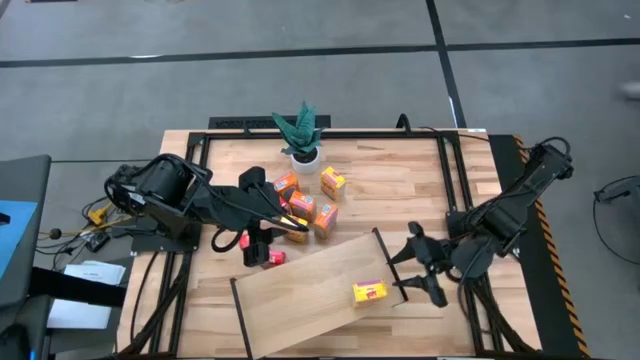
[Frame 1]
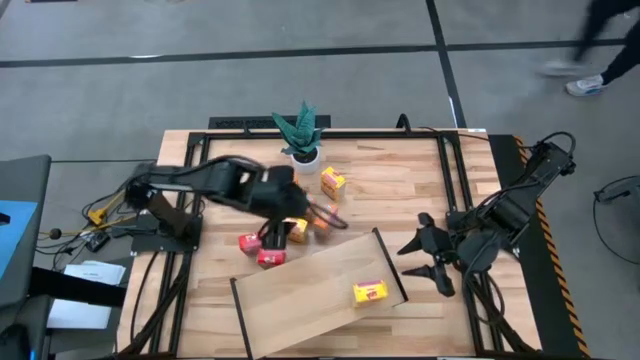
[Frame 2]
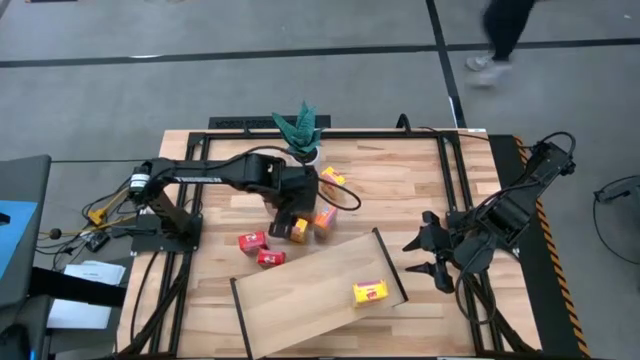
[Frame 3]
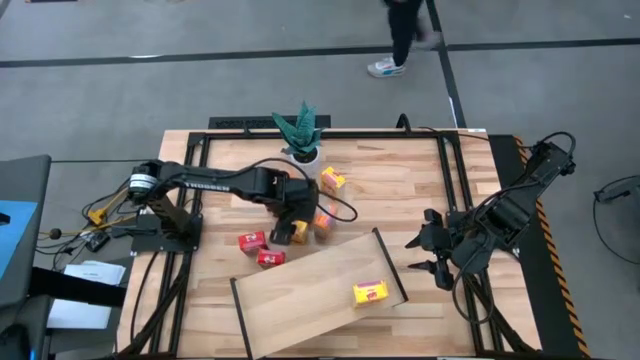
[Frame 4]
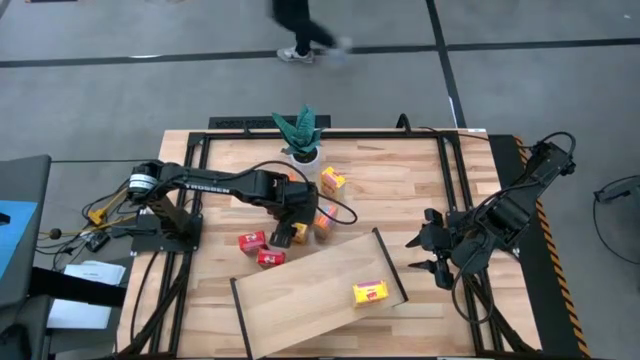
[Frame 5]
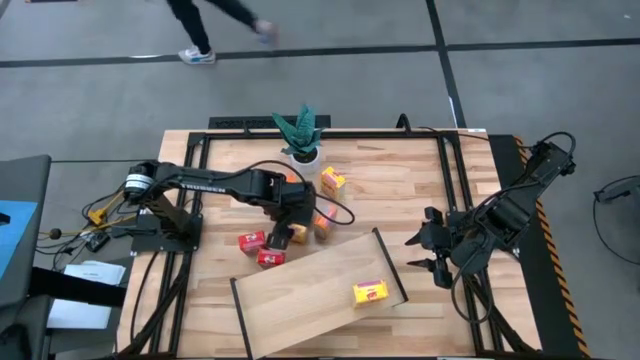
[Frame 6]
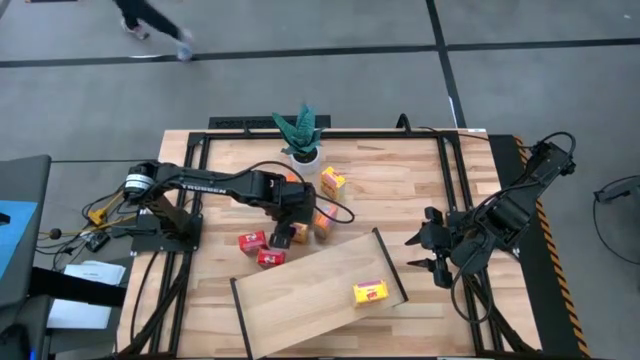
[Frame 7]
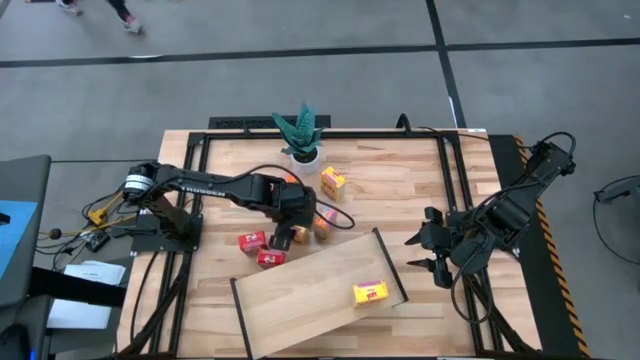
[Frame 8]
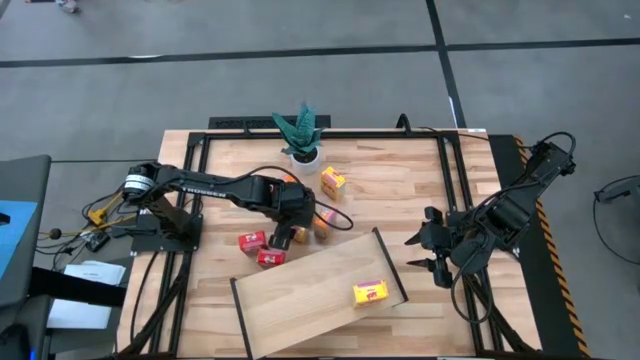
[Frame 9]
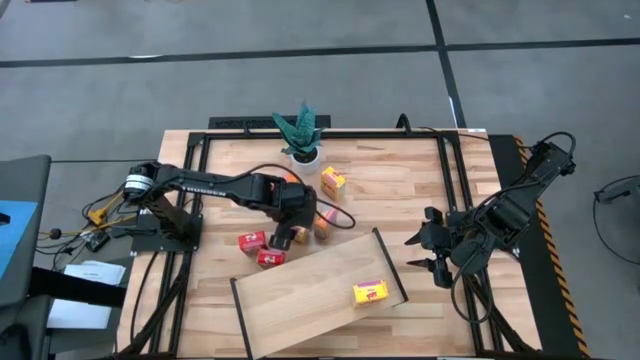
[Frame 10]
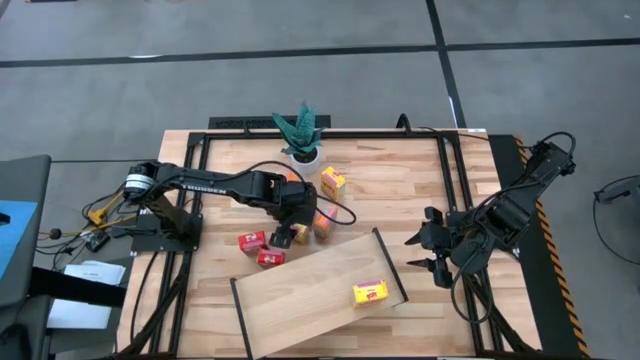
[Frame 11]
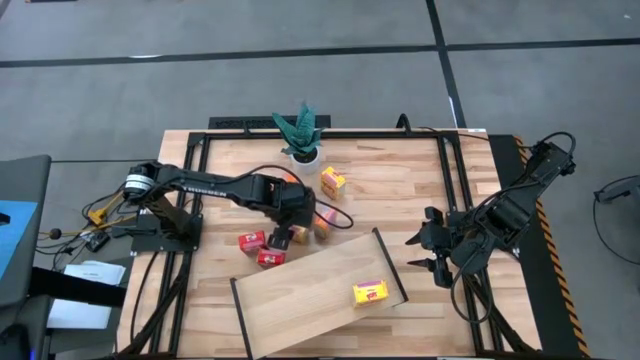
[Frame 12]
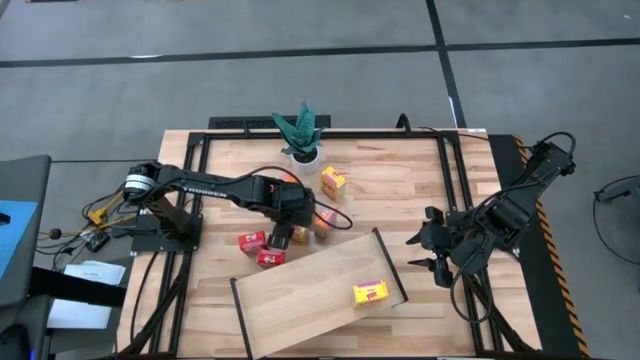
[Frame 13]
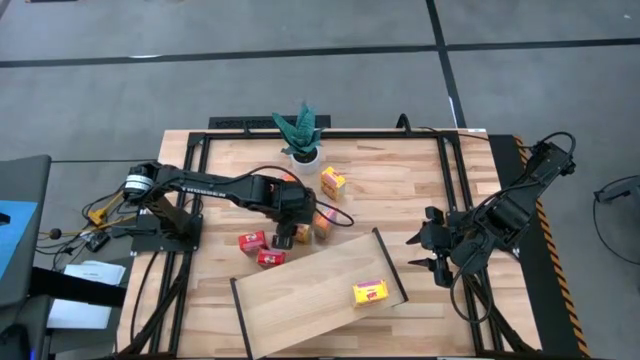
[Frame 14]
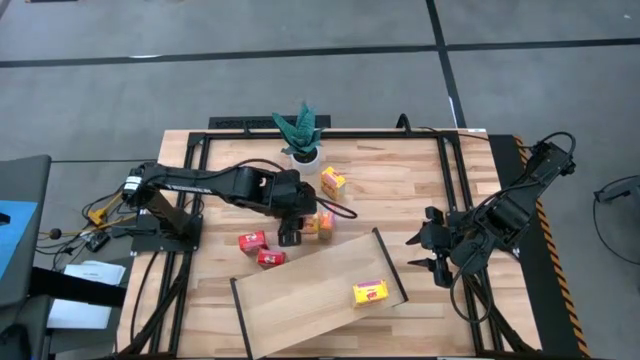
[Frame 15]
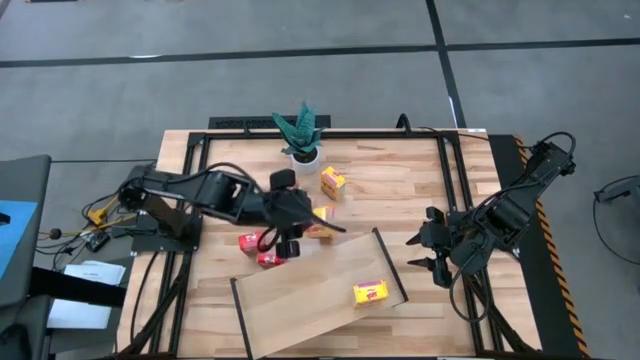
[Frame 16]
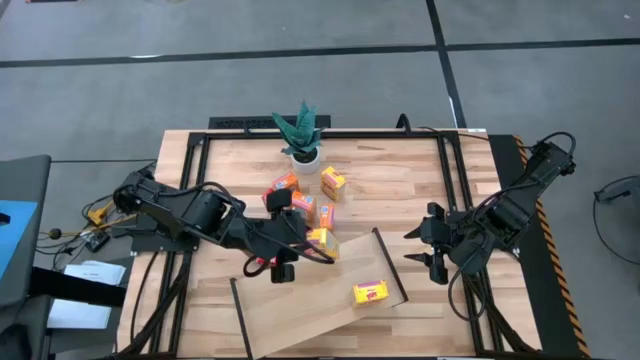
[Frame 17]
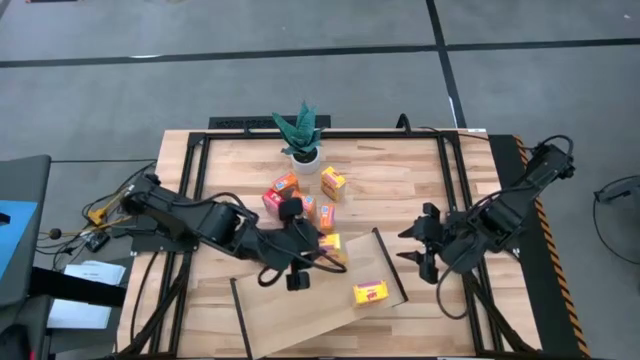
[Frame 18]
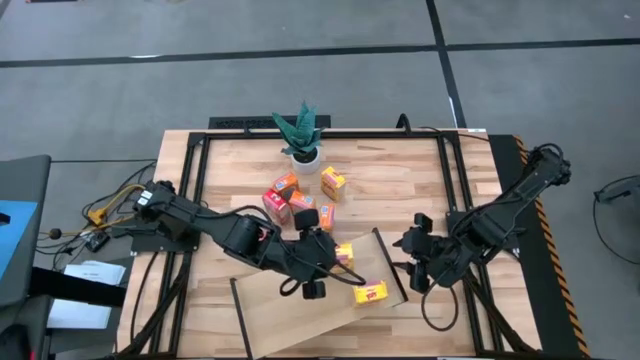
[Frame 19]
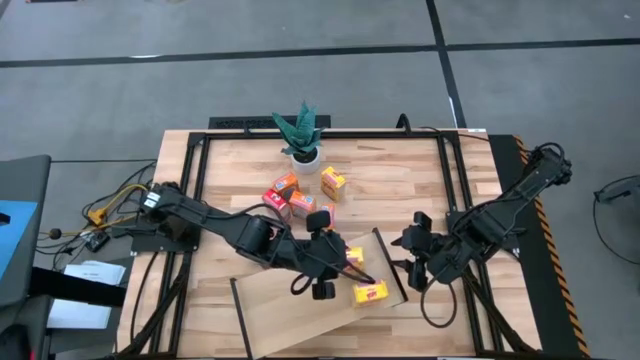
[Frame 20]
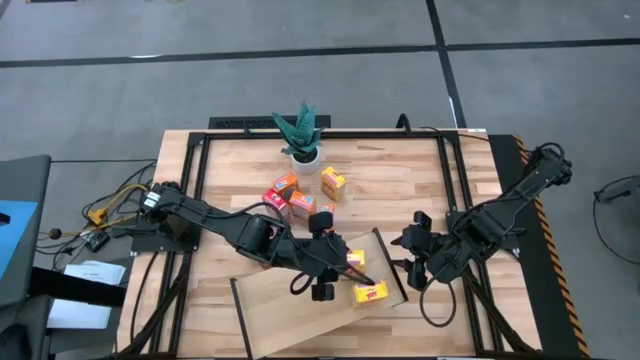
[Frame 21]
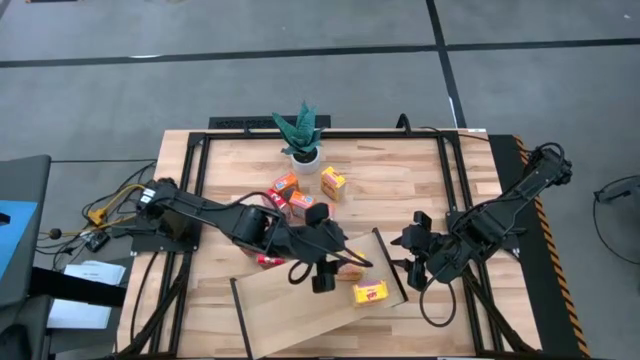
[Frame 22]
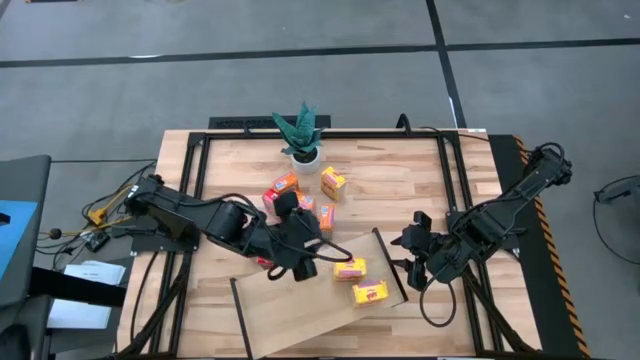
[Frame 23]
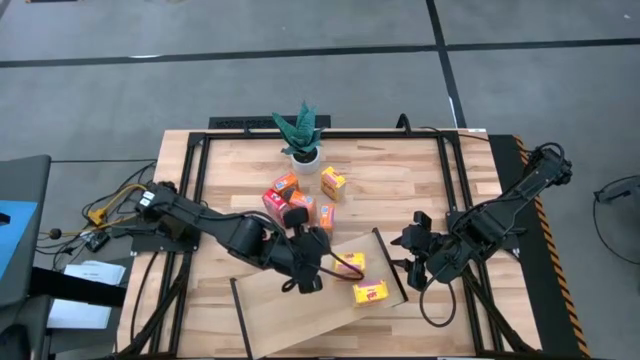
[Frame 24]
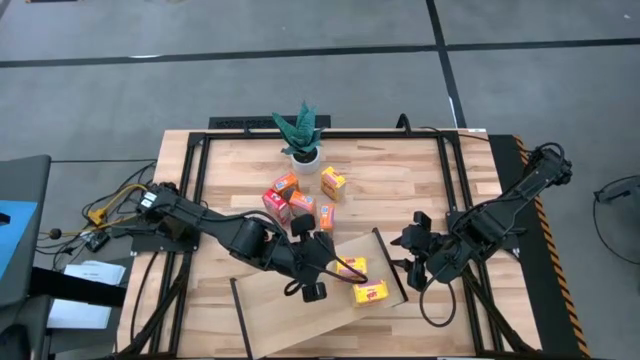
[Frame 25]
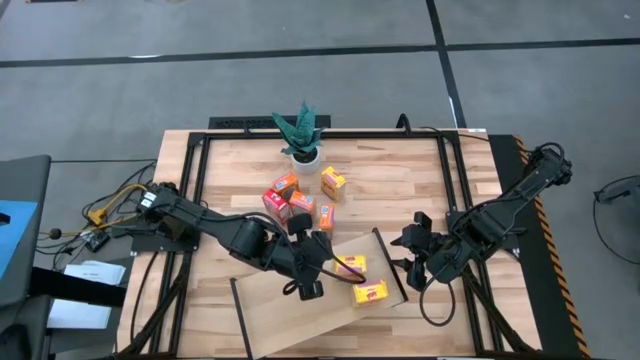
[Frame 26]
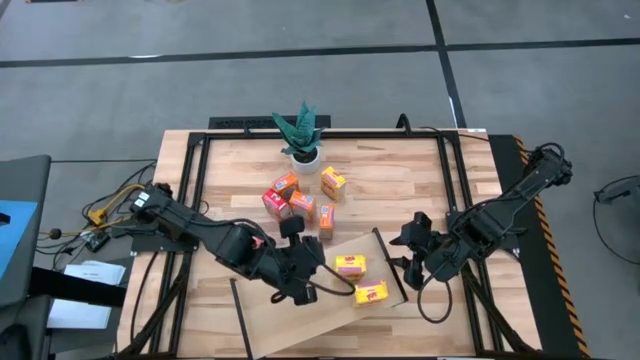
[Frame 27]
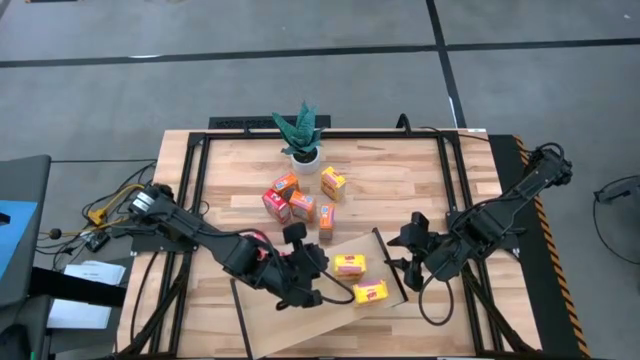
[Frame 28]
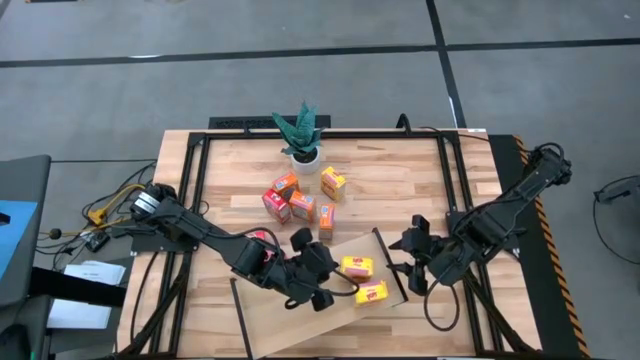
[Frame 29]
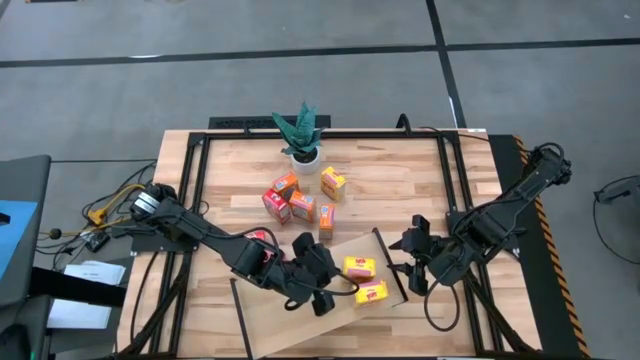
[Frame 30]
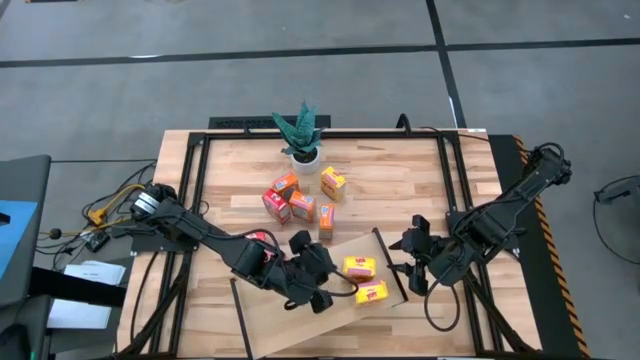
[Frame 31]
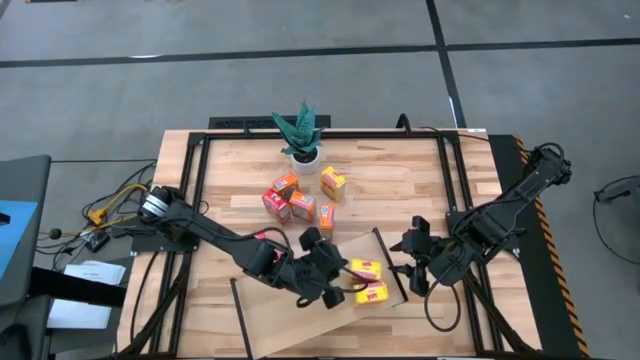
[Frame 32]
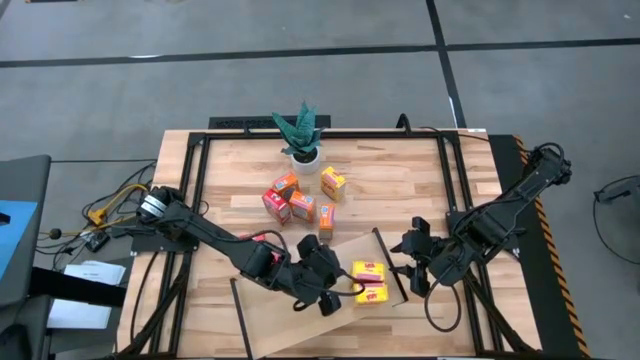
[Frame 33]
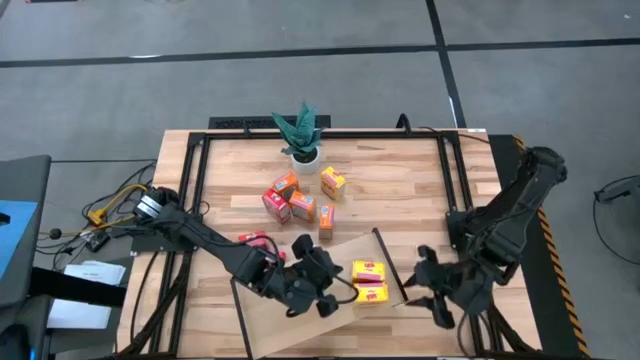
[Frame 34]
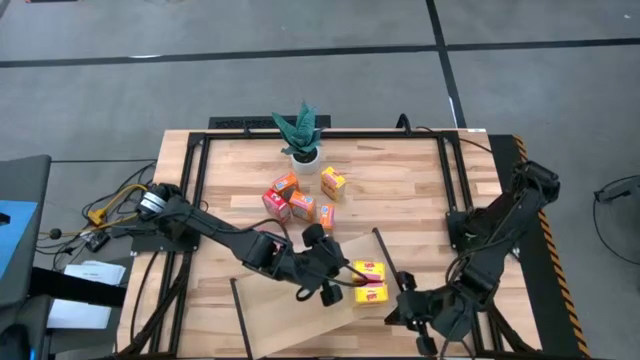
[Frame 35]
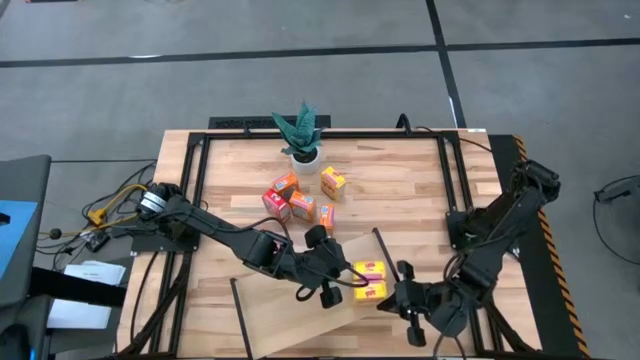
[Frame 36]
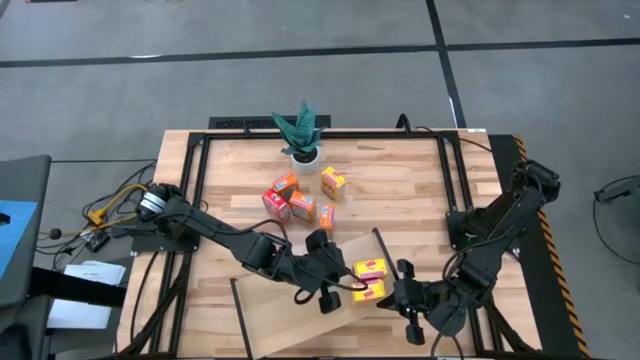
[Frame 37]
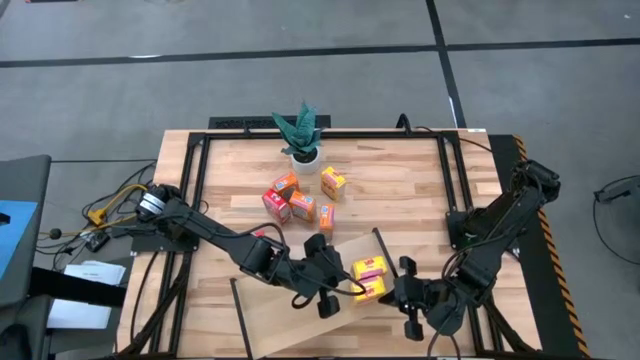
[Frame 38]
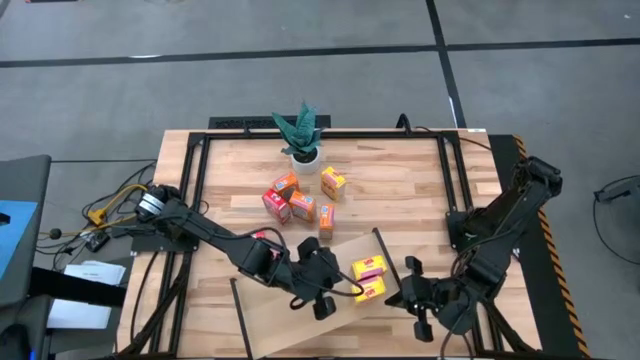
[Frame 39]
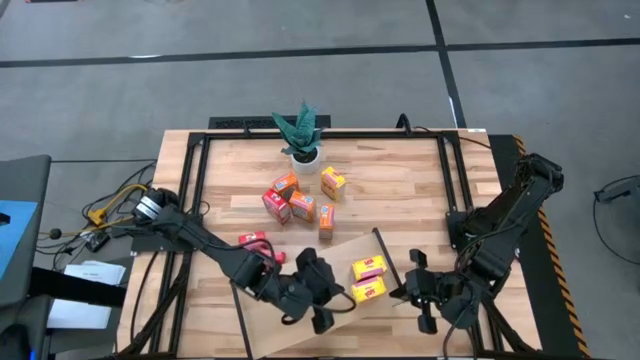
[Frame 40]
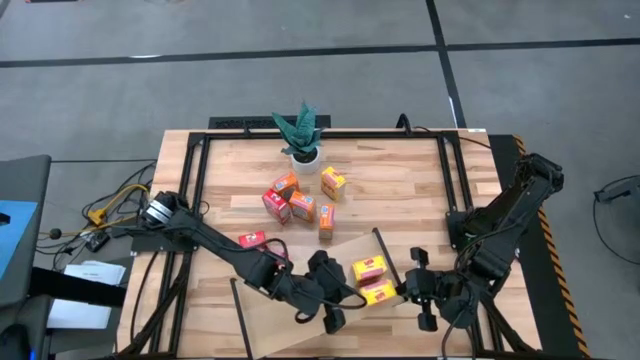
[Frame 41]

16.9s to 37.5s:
Task: Stack cereal on shelf
Put the bottom yellow cereal box on the shelf aligned with the yellow cereal box

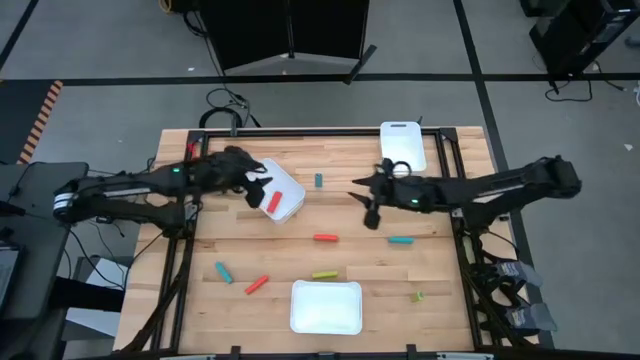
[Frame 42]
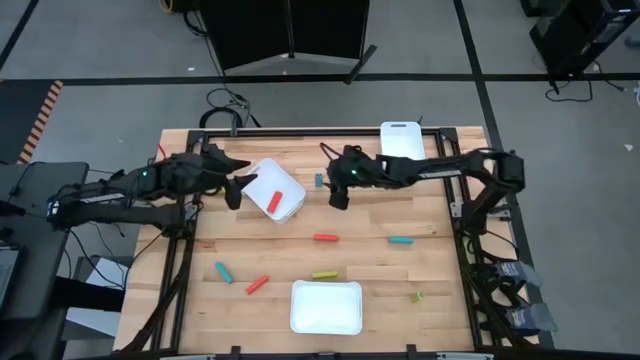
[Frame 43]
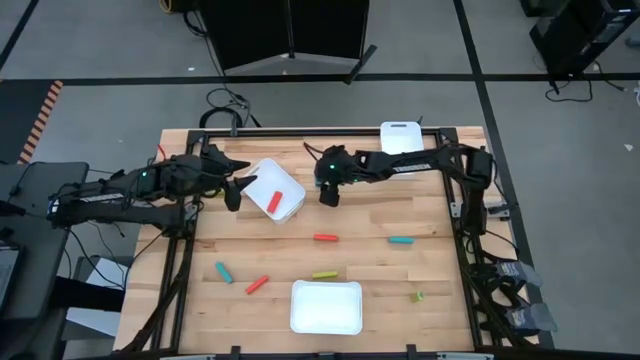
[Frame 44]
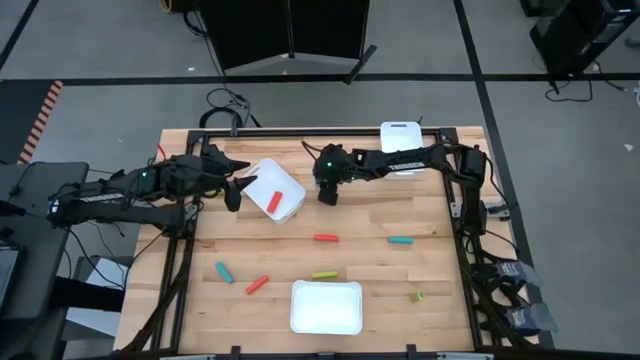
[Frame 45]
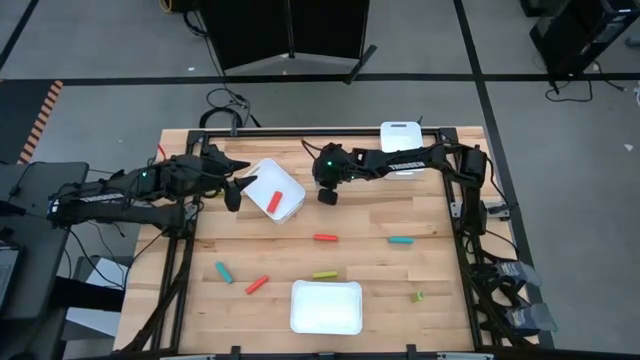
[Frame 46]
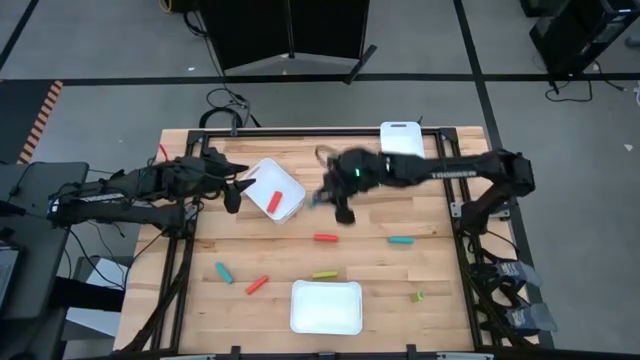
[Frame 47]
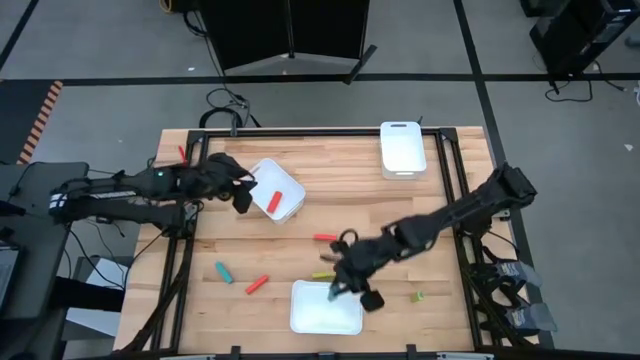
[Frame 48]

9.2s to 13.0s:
Task: Sort blocks
Put the top blue block into the bottom bin
